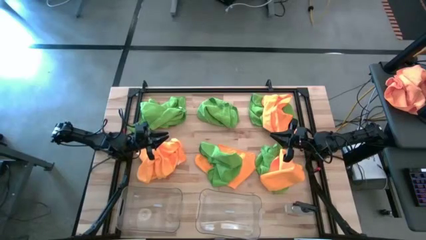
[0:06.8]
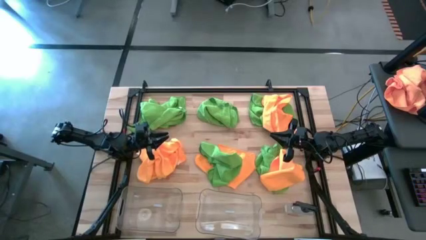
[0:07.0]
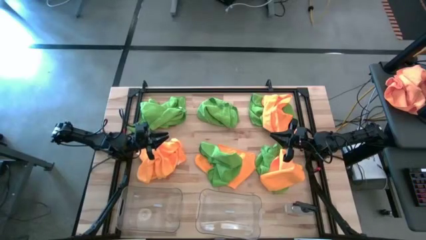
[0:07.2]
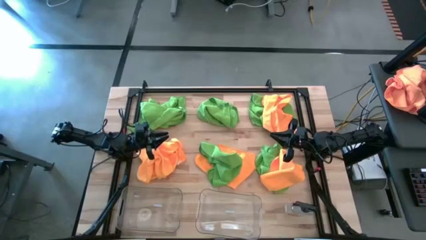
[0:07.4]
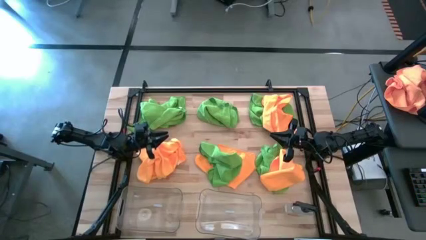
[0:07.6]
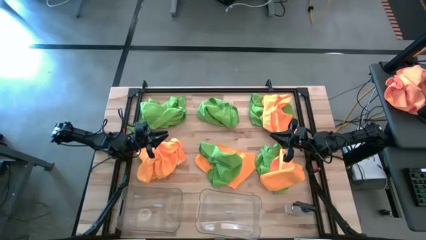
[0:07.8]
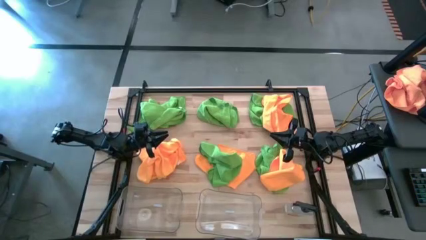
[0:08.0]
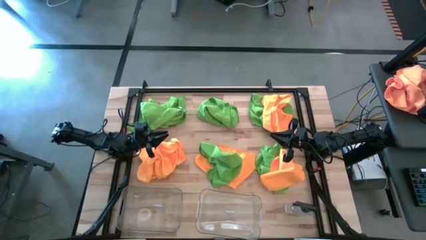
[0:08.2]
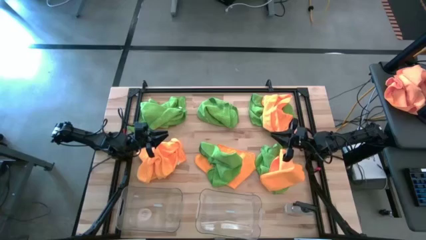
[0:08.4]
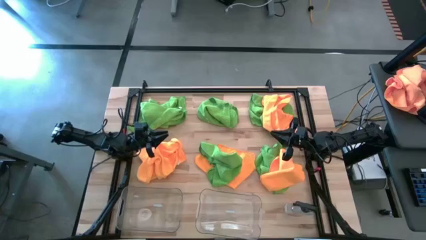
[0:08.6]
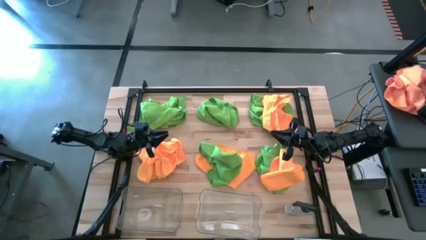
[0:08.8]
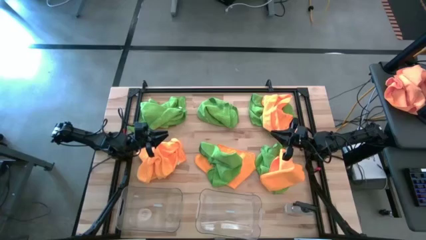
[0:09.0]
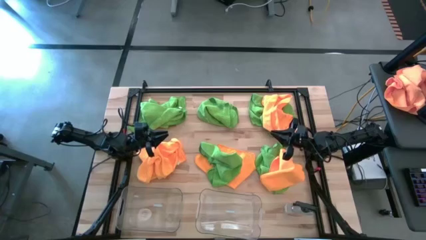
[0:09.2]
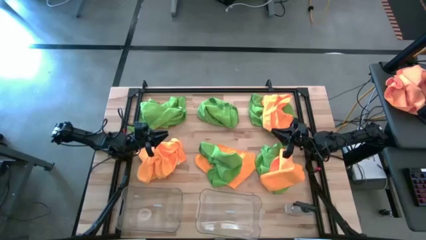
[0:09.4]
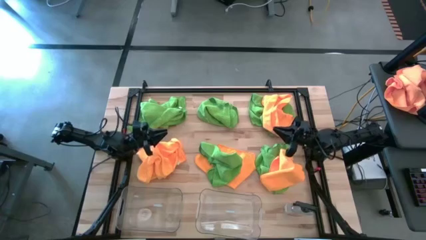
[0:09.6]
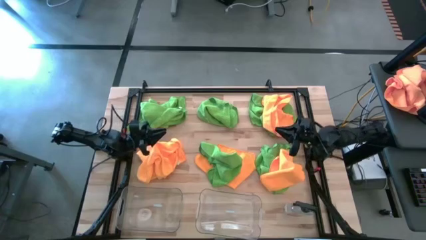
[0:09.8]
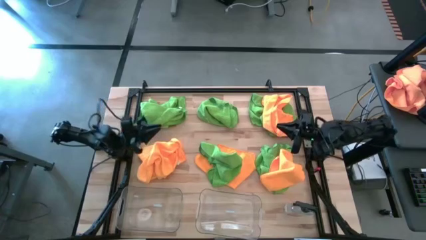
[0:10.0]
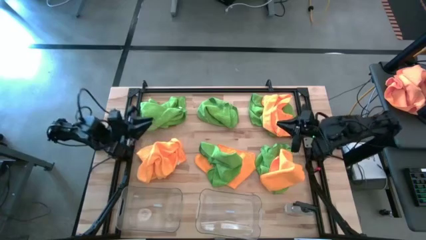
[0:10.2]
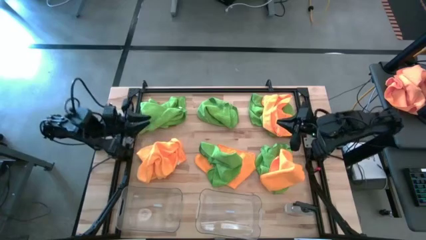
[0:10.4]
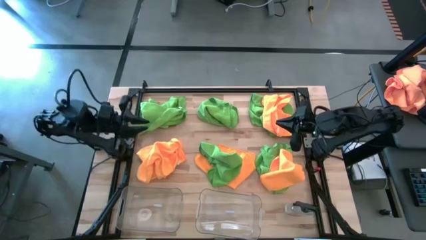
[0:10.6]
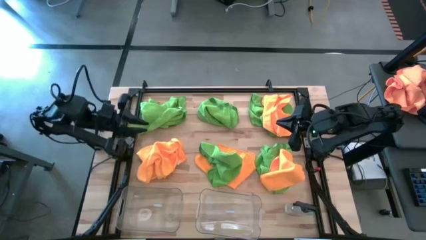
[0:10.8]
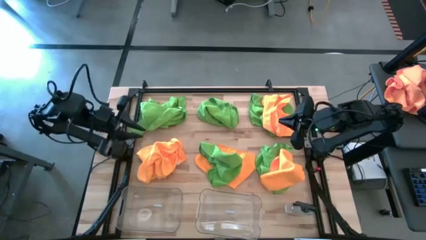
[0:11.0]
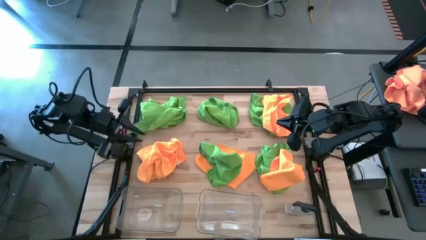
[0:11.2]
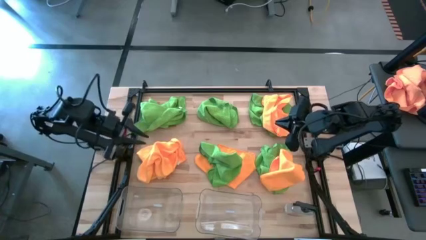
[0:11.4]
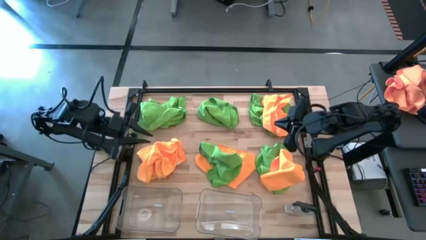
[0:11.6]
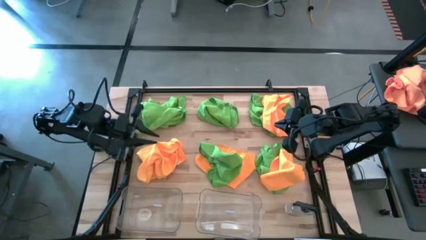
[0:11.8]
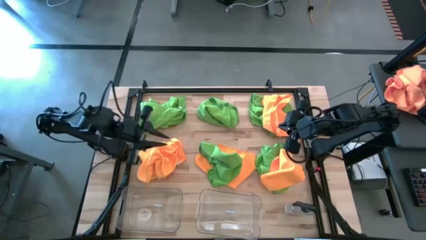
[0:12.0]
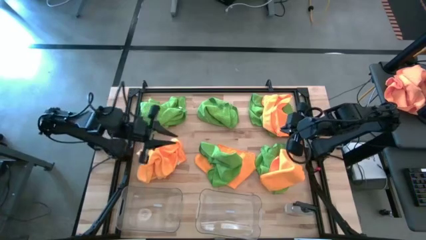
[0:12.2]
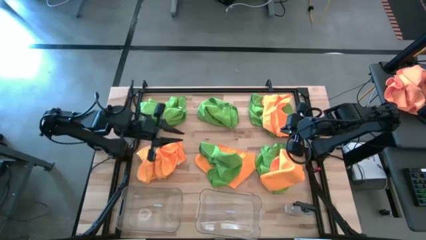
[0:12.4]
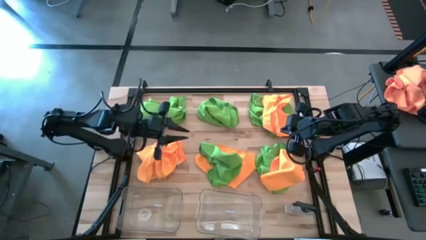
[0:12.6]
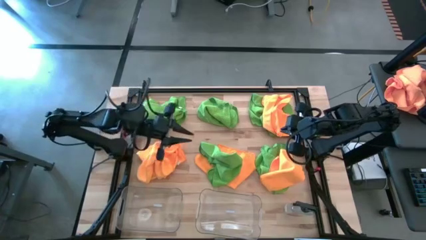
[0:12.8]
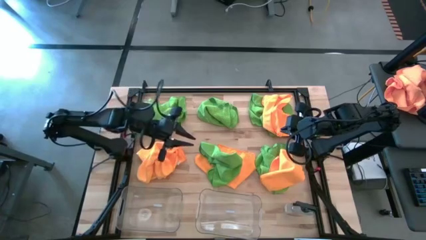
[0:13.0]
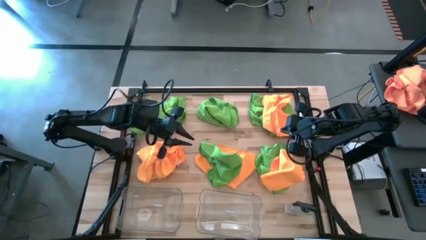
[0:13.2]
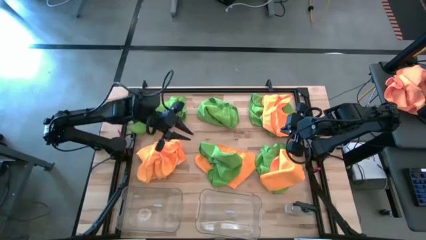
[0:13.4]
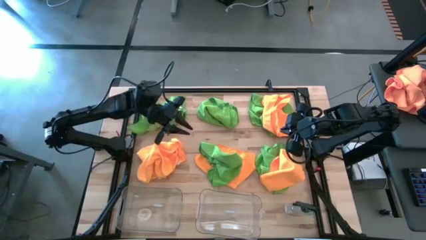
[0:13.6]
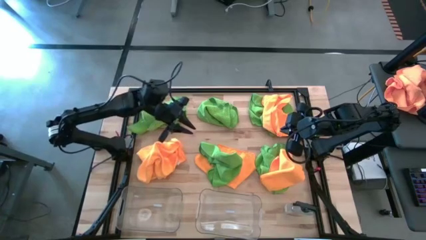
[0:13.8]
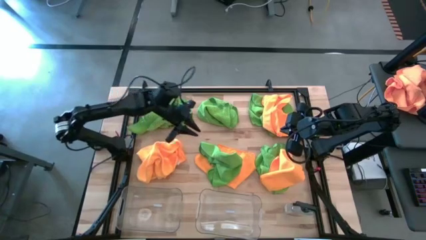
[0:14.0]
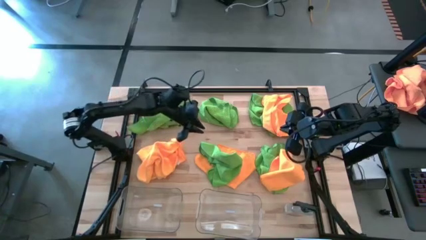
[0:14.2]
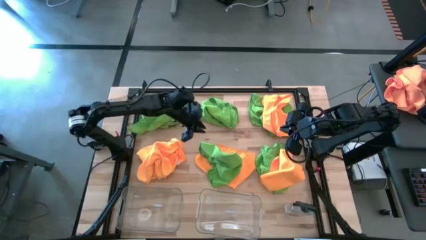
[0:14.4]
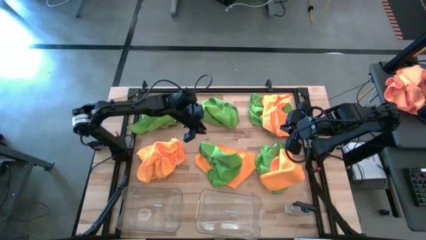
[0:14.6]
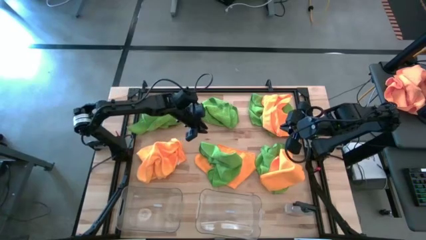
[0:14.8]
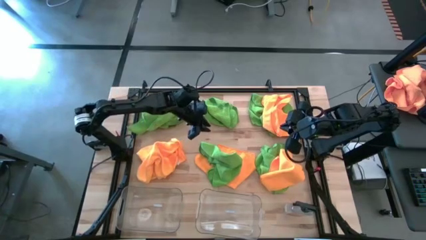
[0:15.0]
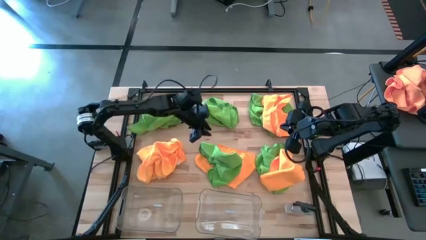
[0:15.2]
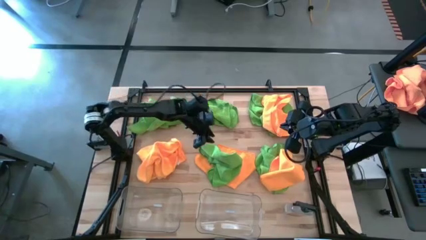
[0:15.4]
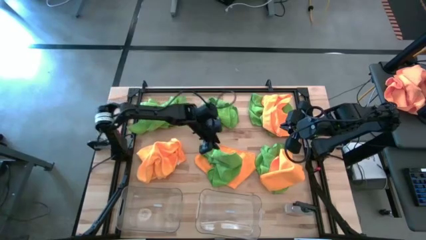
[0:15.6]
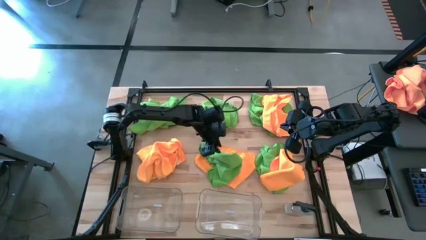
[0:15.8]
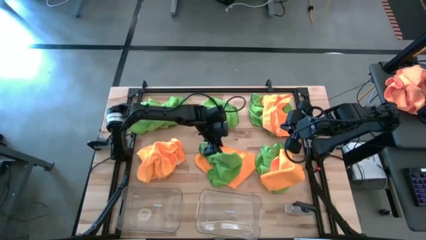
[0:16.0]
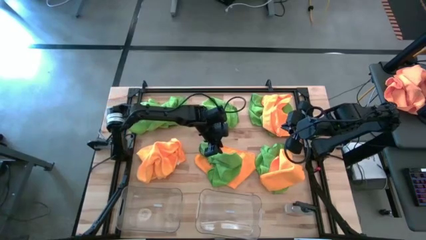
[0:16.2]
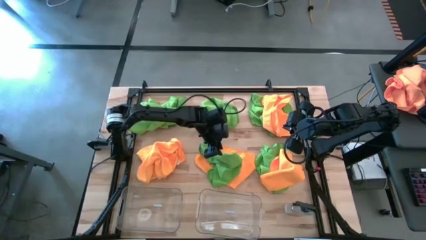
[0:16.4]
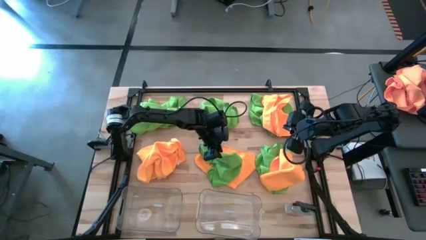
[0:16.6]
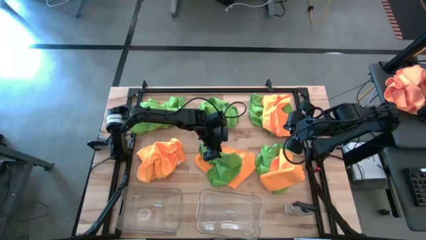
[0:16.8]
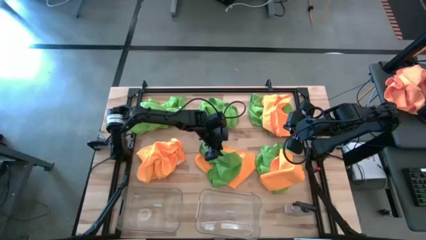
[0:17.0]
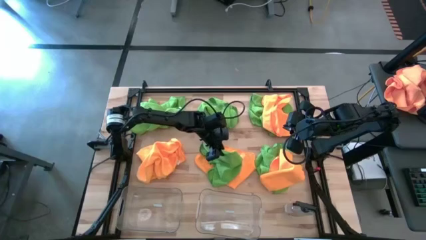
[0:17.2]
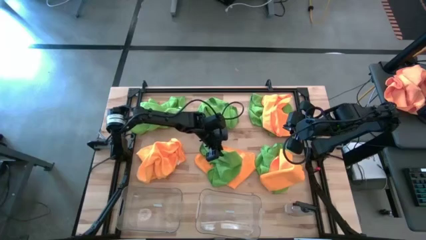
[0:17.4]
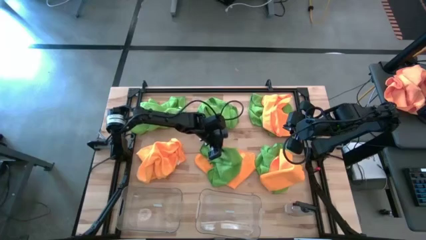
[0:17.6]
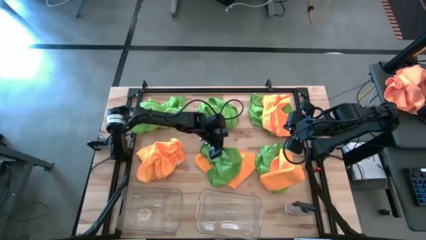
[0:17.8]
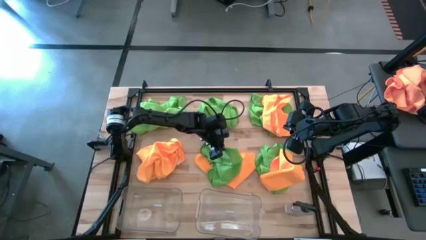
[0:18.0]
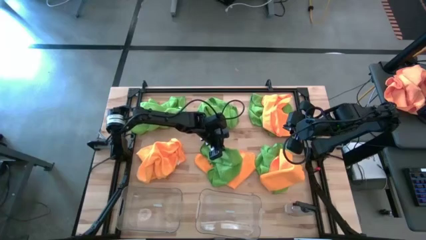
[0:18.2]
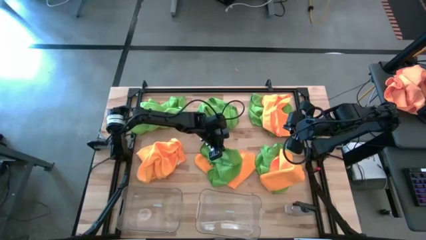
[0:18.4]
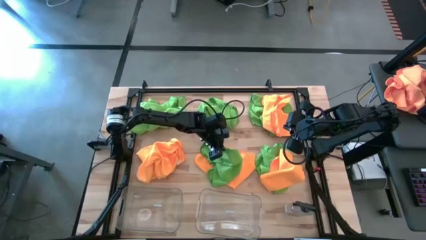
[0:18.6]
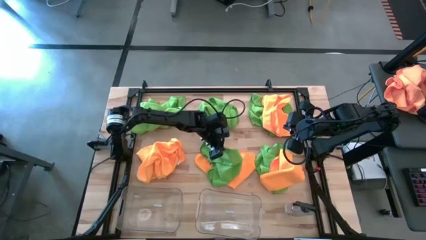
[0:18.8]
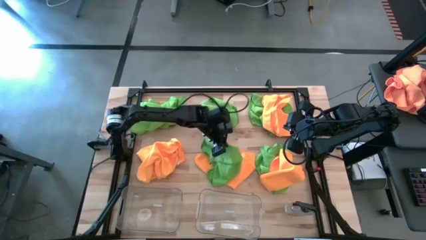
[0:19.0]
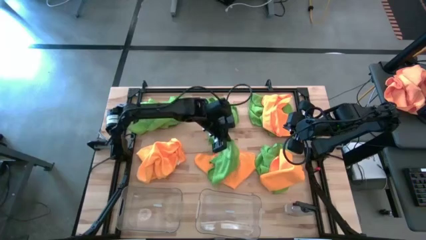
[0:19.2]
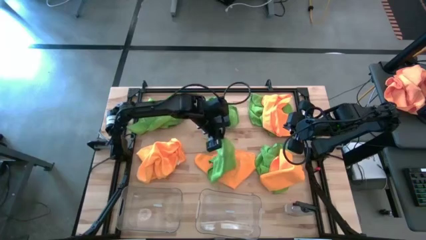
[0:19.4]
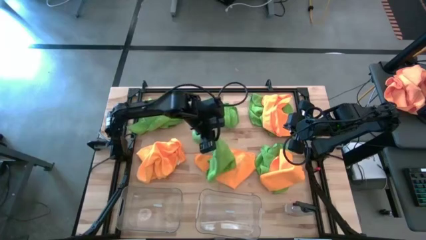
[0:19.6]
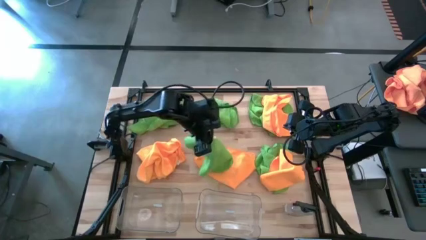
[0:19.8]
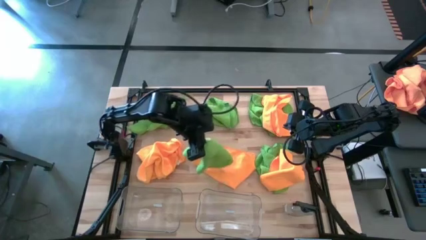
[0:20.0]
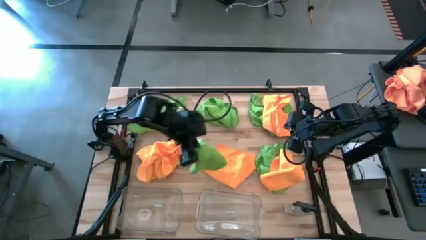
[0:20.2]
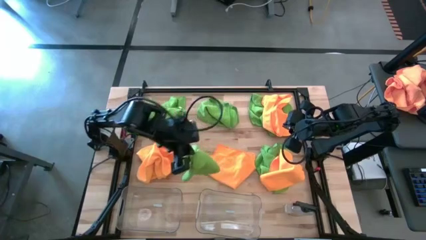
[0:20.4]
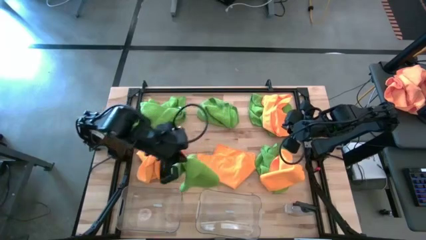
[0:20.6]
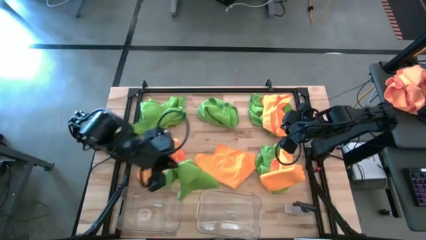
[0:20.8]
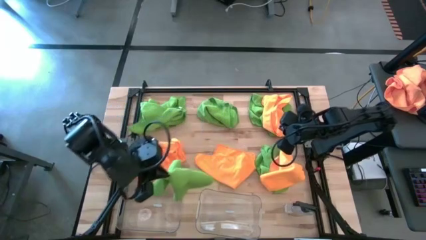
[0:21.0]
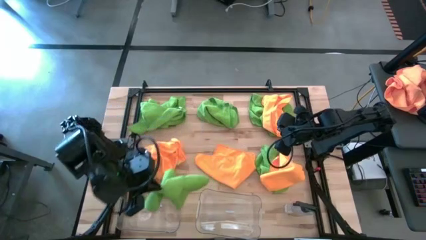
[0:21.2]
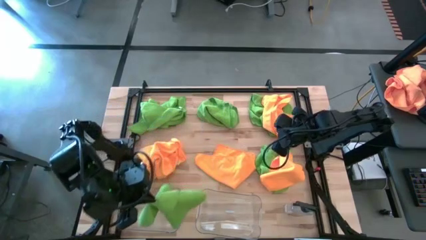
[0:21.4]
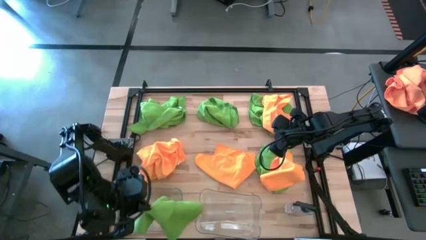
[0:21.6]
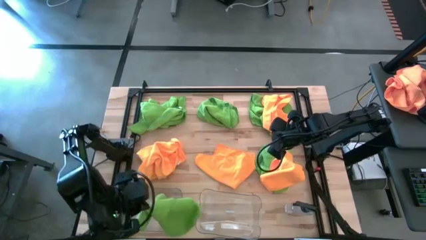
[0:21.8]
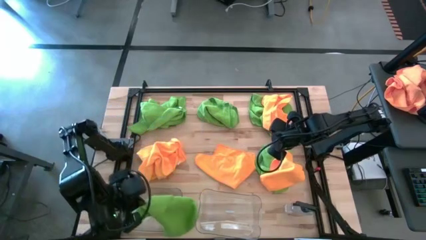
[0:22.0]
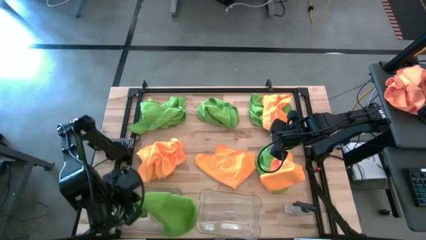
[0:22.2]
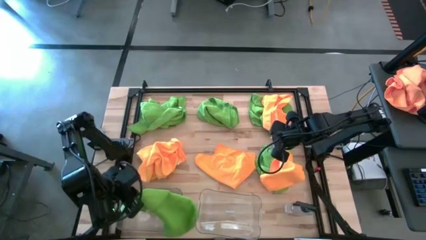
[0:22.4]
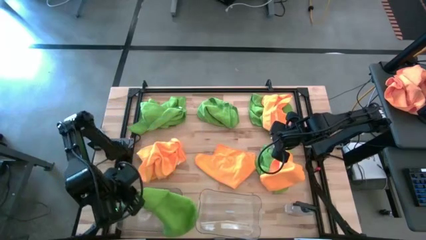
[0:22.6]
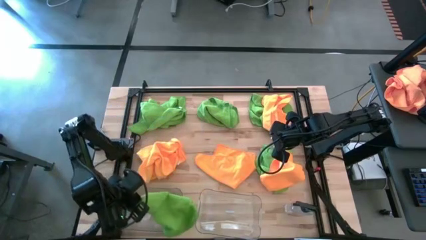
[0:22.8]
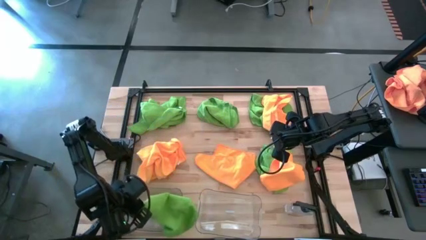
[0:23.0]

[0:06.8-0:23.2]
Task: Sort microfiber towel by color & place in baskets
Put the green towel into the left transparent bin
